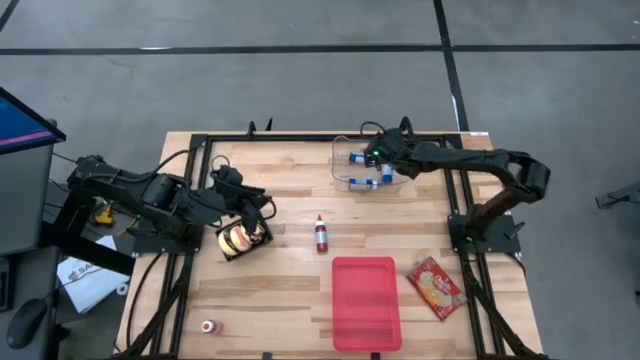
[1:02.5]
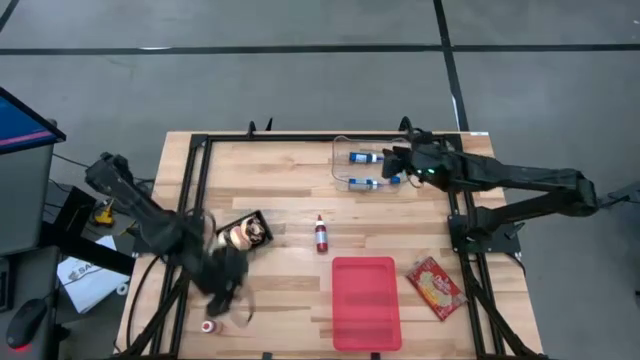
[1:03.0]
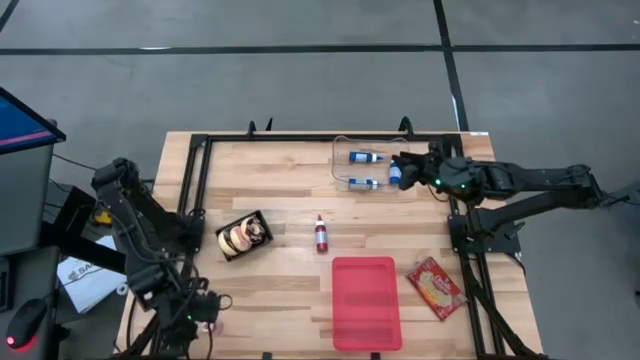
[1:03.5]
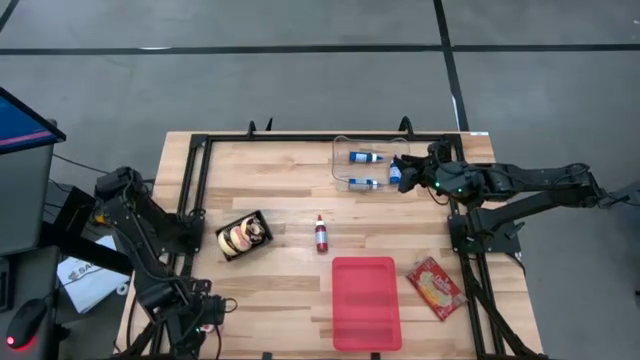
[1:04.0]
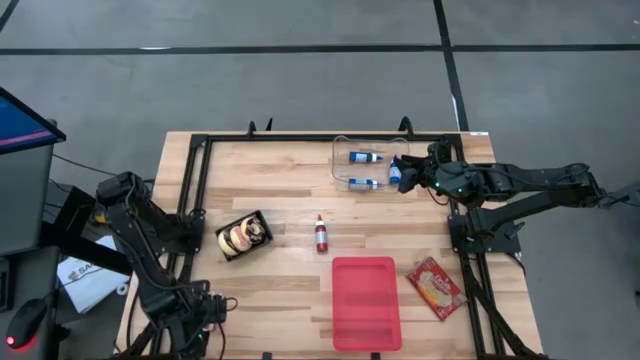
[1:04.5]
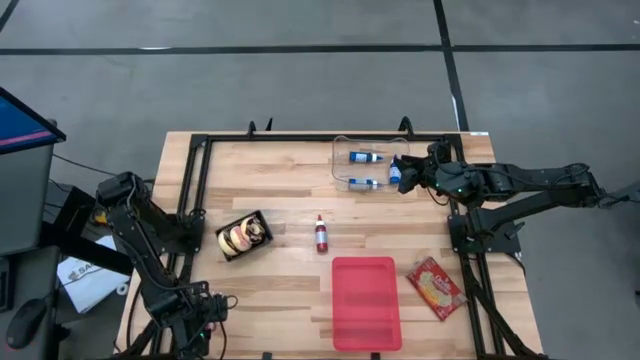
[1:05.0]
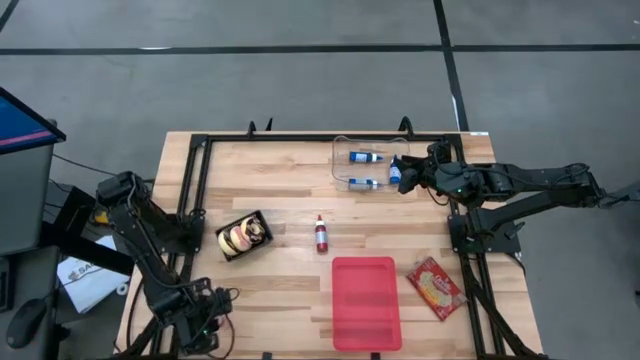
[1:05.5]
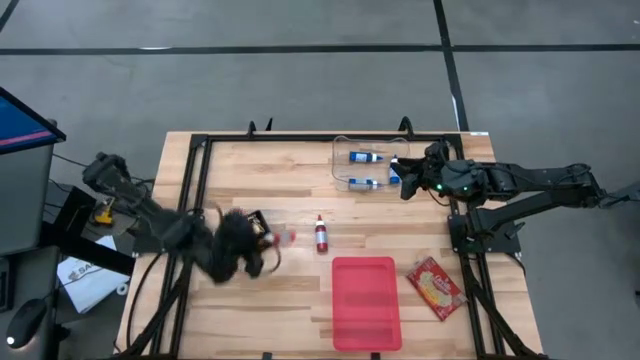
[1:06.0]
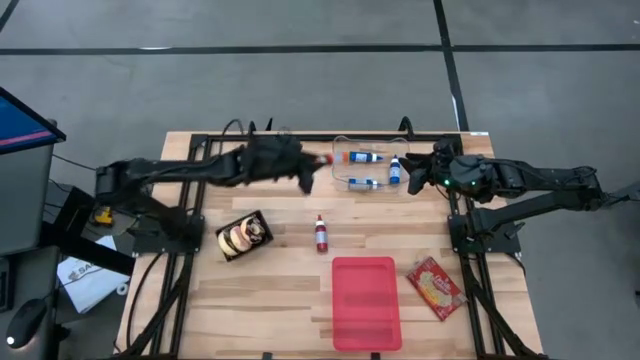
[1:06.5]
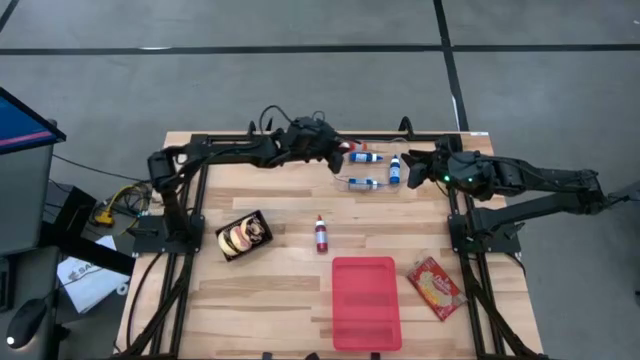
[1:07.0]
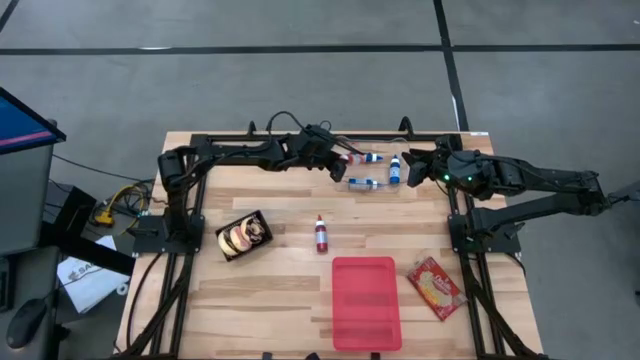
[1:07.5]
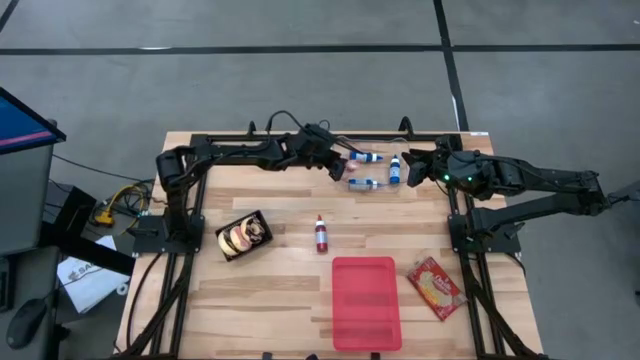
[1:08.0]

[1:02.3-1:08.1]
Put the orange food coloring bottle into the transparent bin

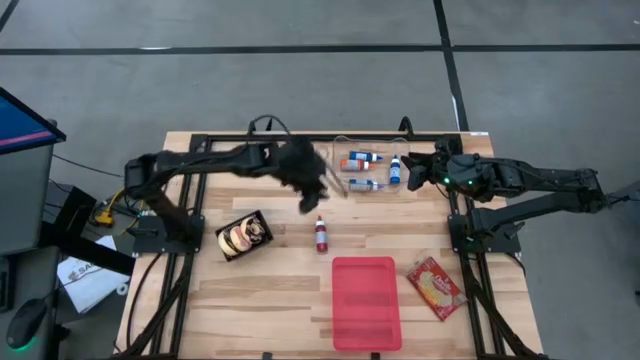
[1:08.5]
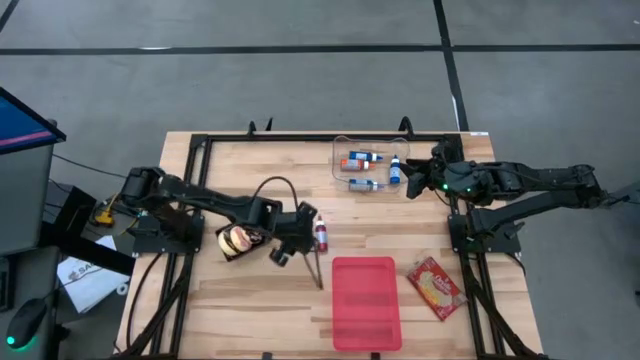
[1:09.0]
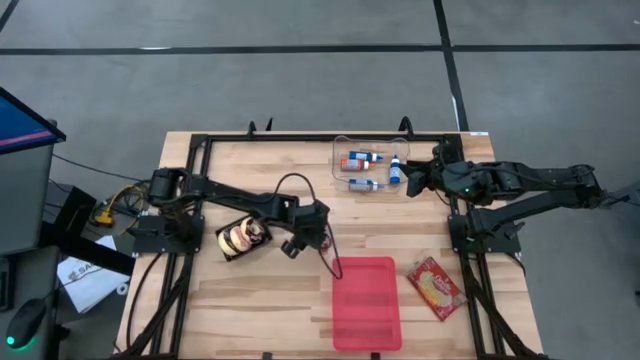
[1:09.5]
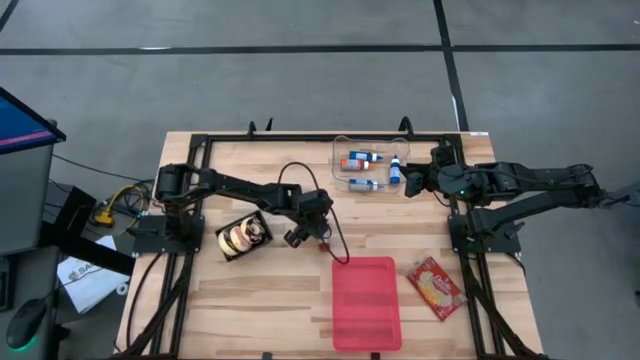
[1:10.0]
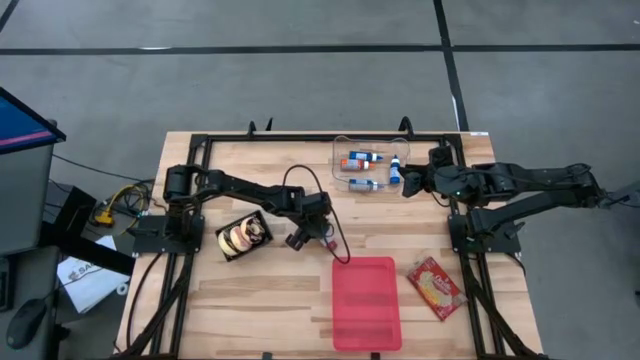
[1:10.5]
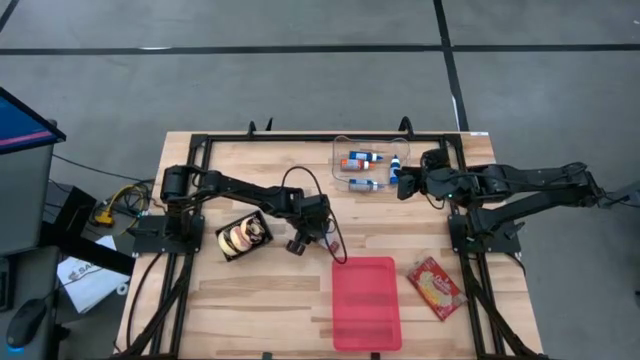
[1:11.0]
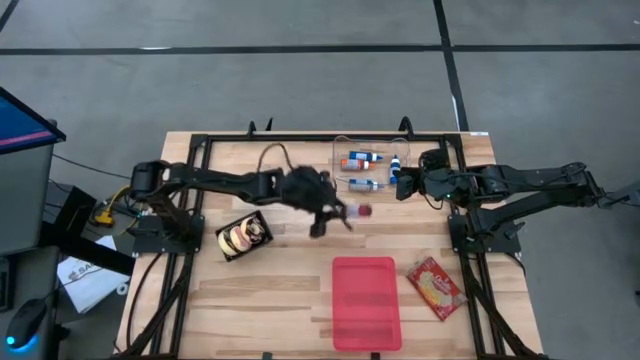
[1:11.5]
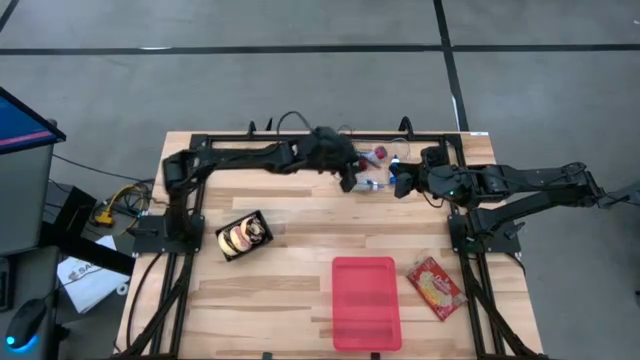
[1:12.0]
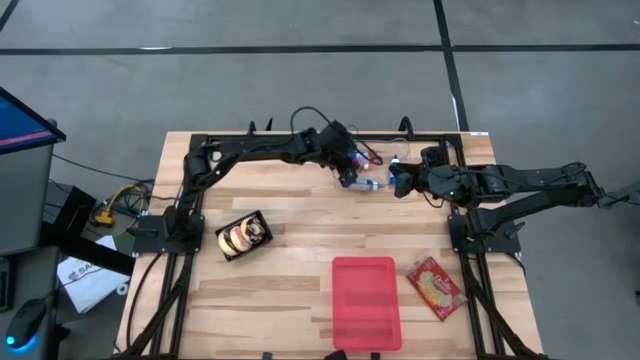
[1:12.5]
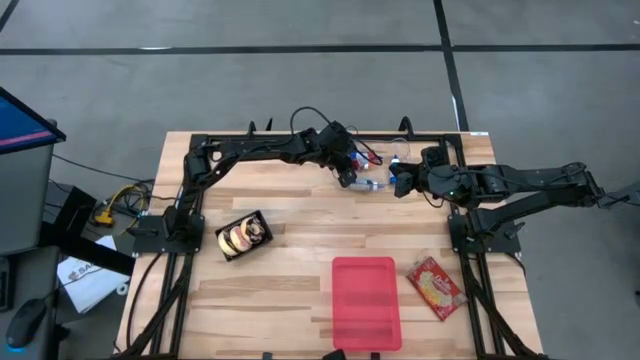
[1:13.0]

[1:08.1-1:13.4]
Put the red food coloring bottle into the transparent bin

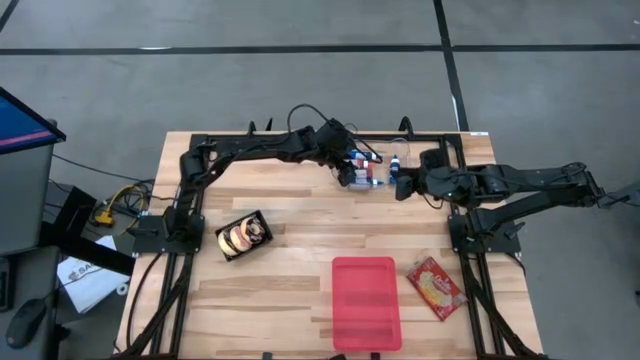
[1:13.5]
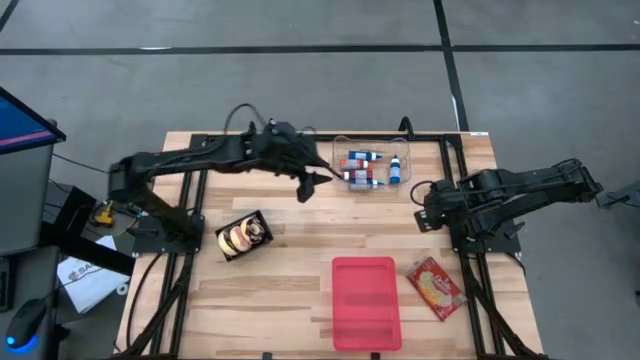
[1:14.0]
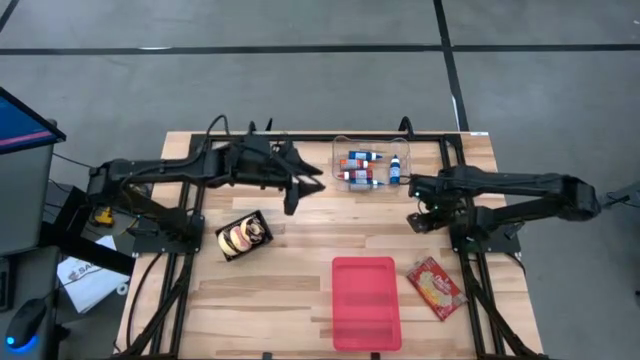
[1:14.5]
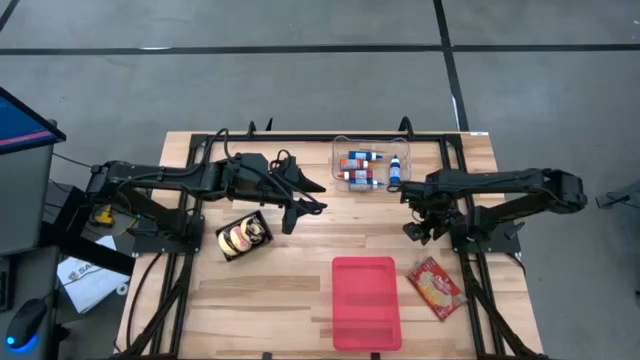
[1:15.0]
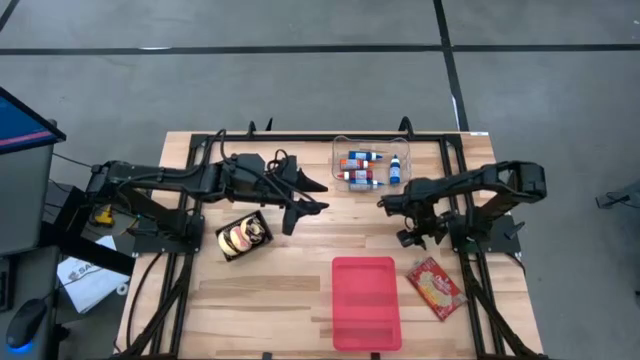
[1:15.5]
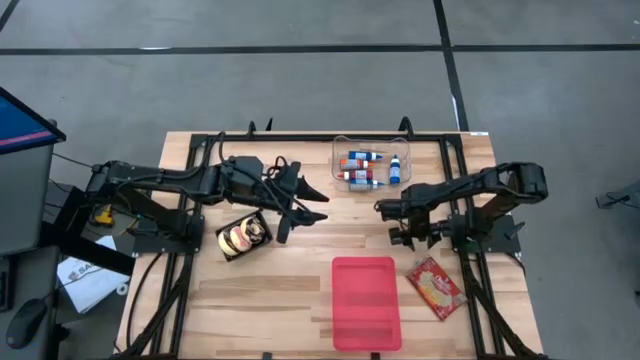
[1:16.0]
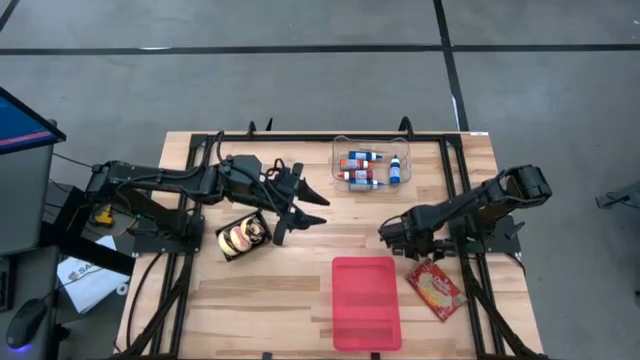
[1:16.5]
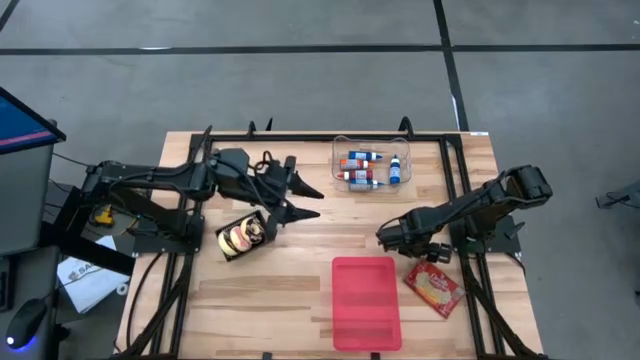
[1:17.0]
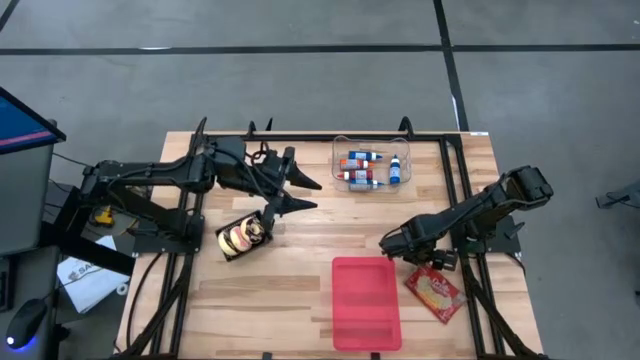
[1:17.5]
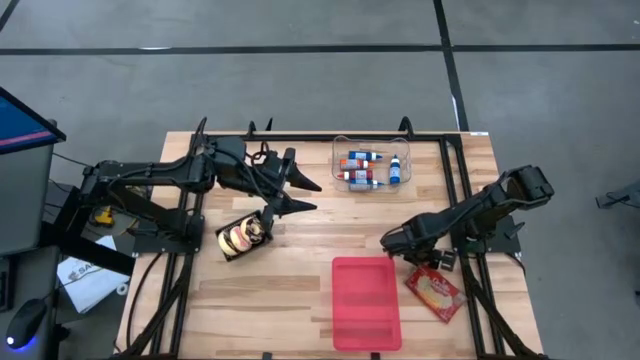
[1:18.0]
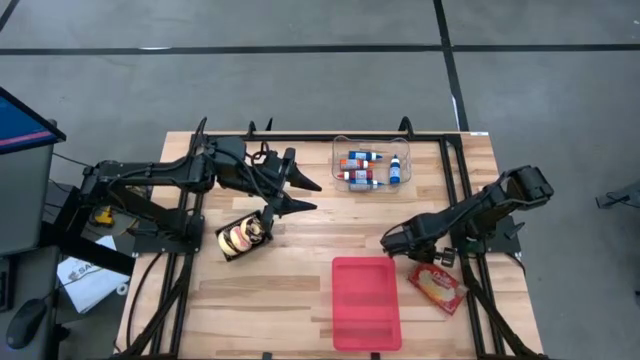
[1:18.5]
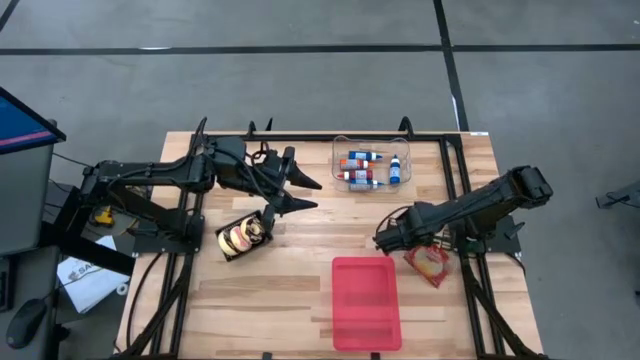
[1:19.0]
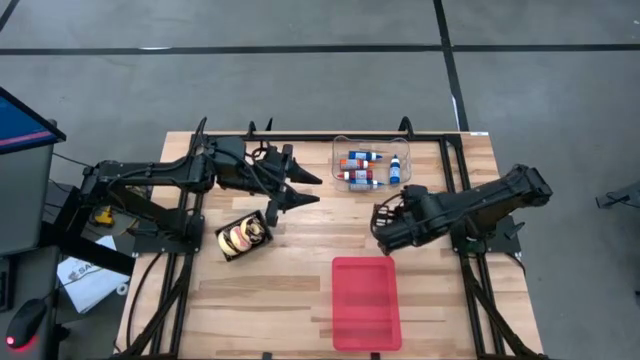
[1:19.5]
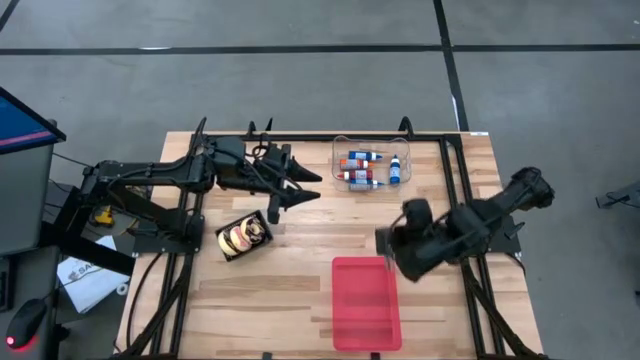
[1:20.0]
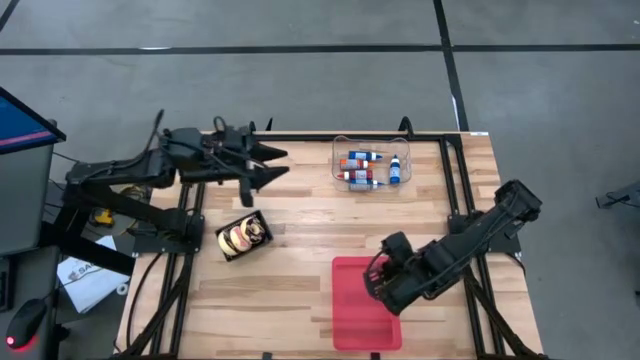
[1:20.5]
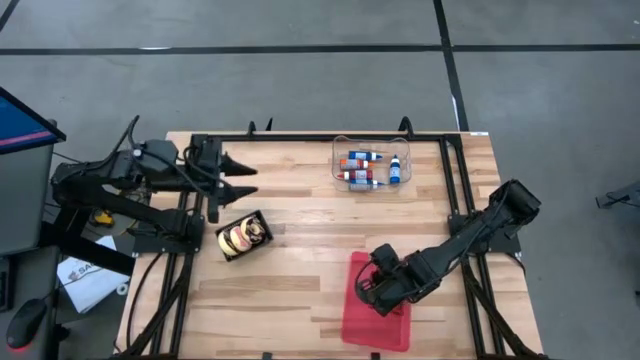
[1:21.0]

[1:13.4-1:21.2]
Put the red popcorn bag into the pink bin

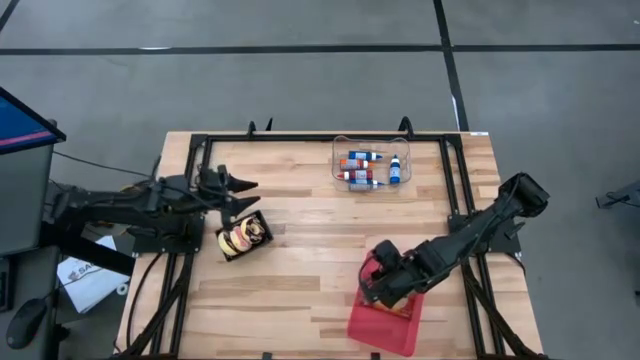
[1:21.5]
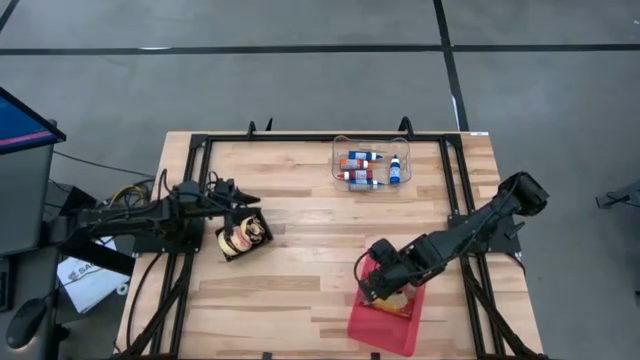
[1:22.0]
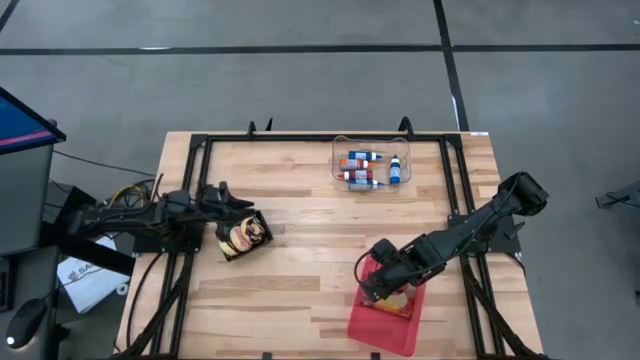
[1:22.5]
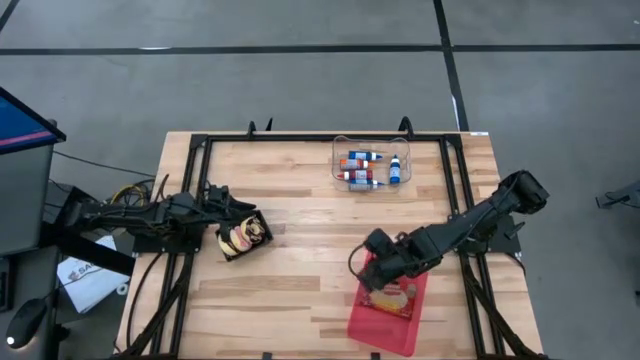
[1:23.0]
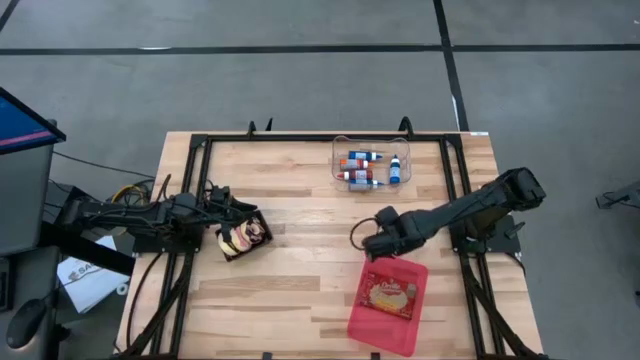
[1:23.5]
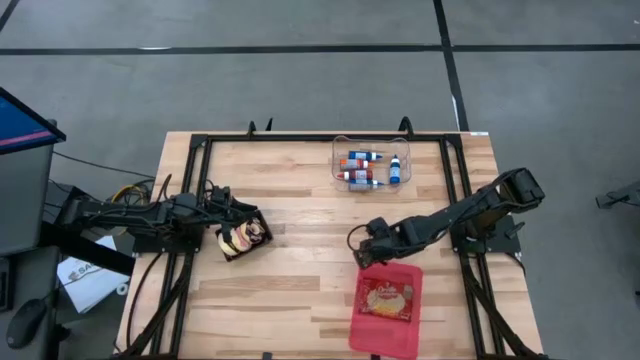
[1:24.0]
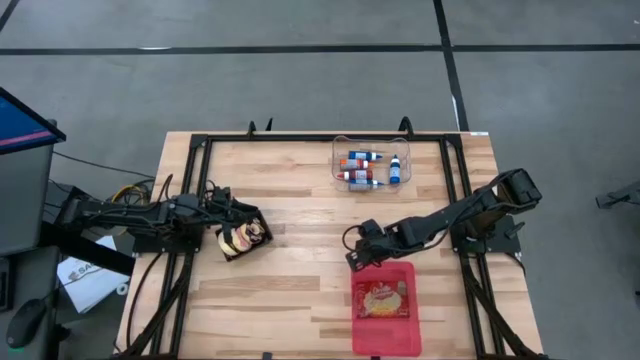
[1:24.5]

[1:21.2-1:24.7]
Adjust the pink bin
